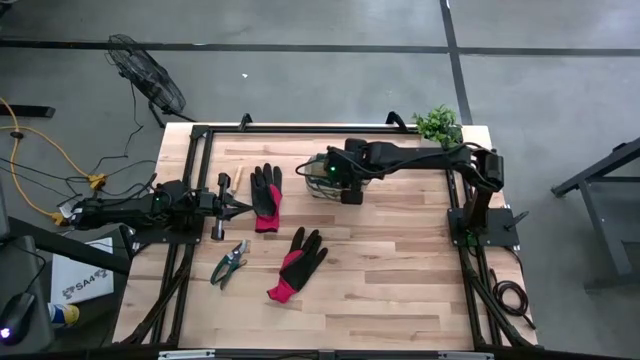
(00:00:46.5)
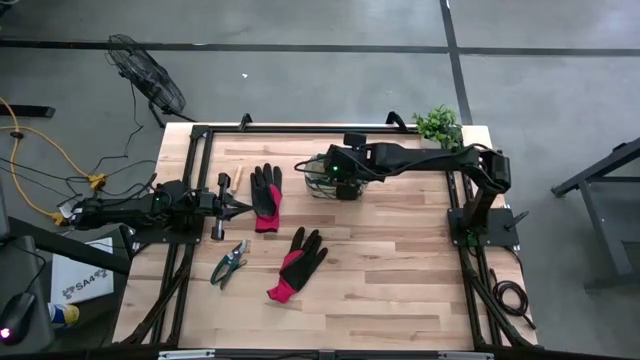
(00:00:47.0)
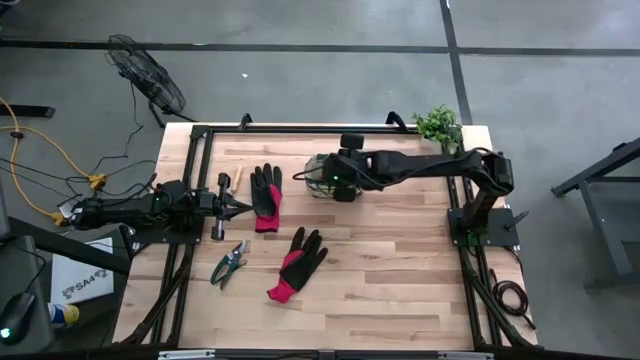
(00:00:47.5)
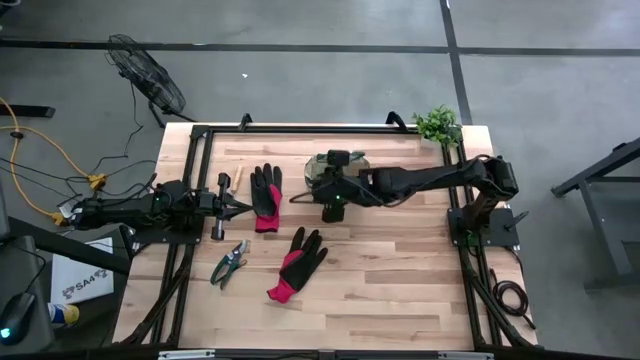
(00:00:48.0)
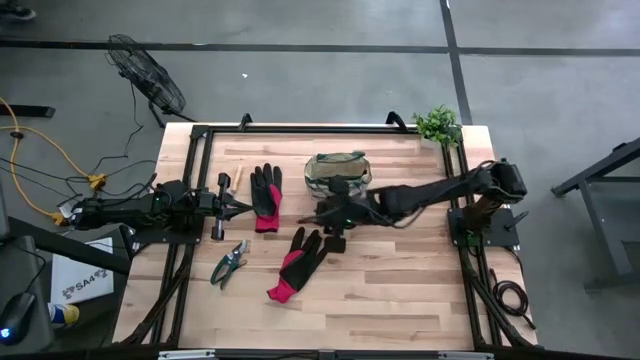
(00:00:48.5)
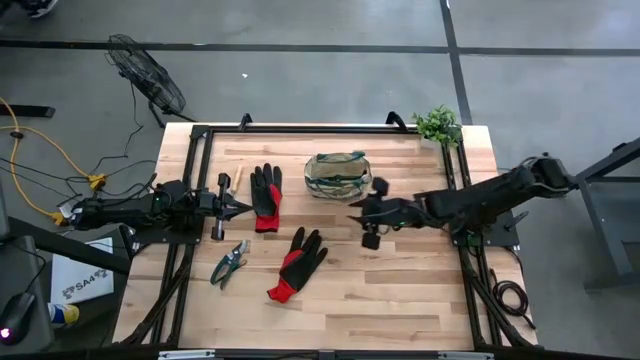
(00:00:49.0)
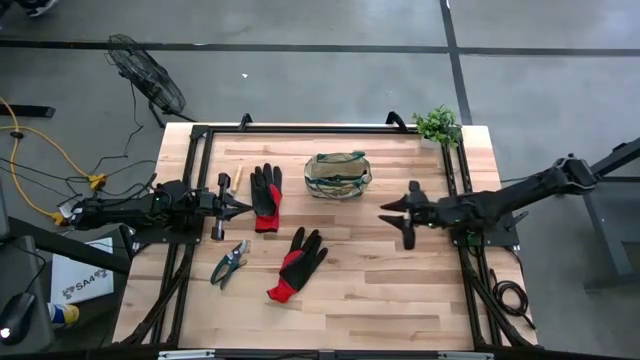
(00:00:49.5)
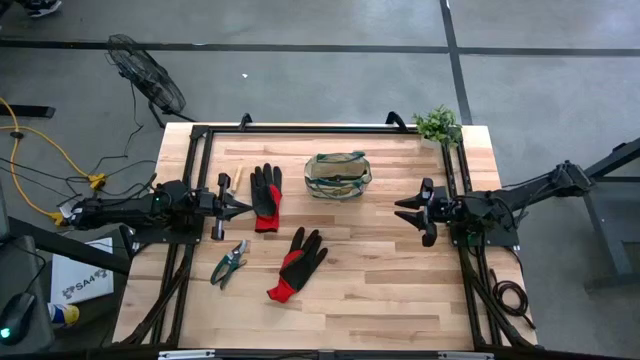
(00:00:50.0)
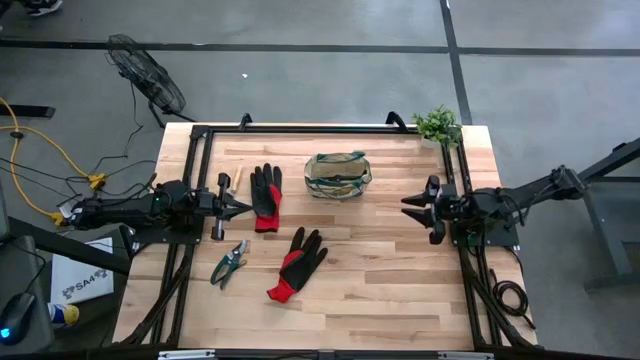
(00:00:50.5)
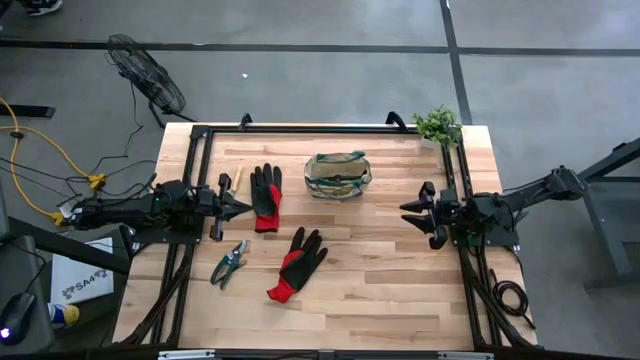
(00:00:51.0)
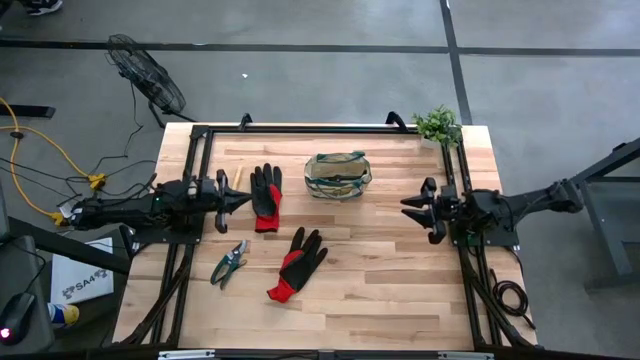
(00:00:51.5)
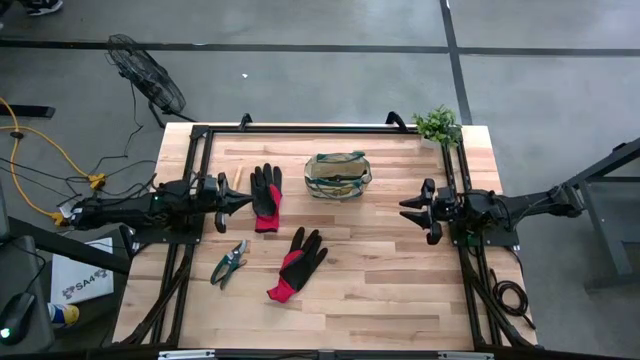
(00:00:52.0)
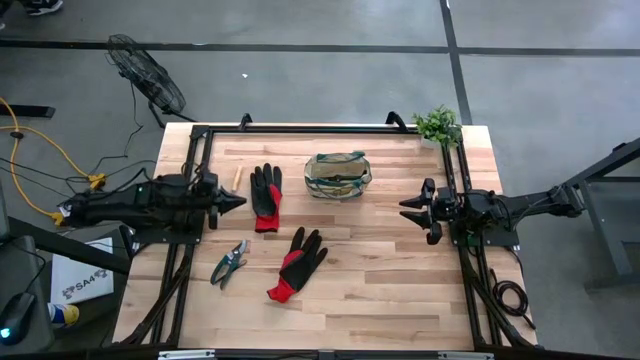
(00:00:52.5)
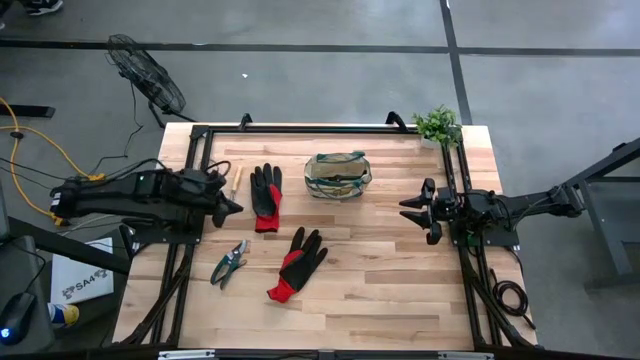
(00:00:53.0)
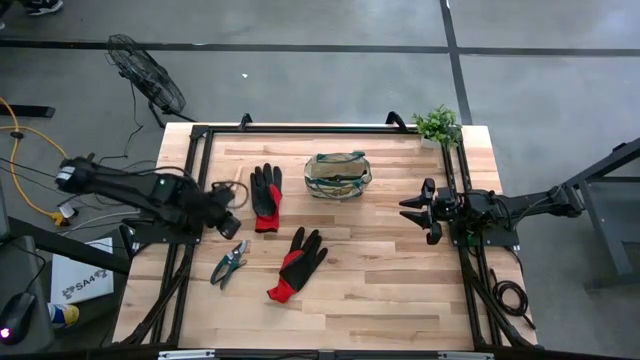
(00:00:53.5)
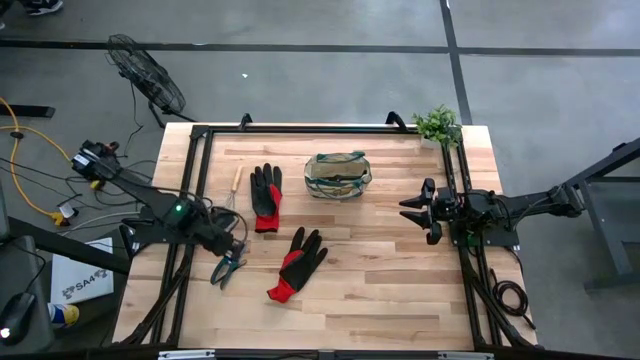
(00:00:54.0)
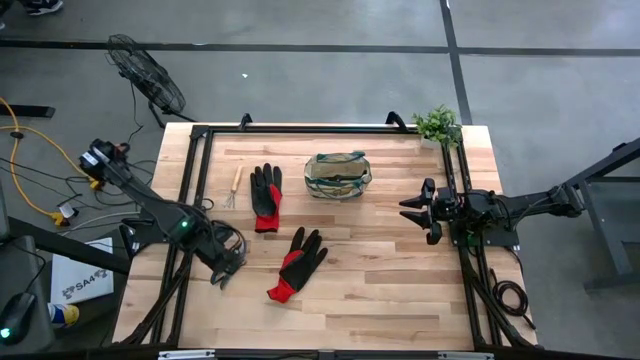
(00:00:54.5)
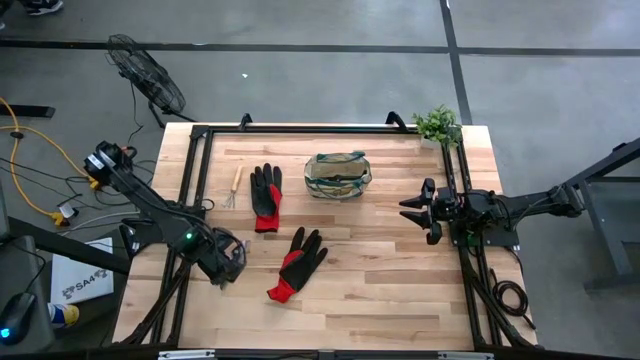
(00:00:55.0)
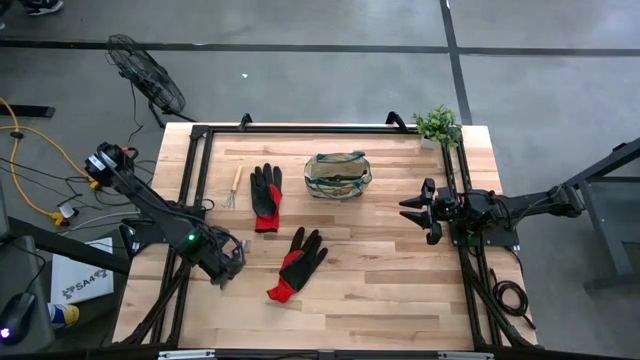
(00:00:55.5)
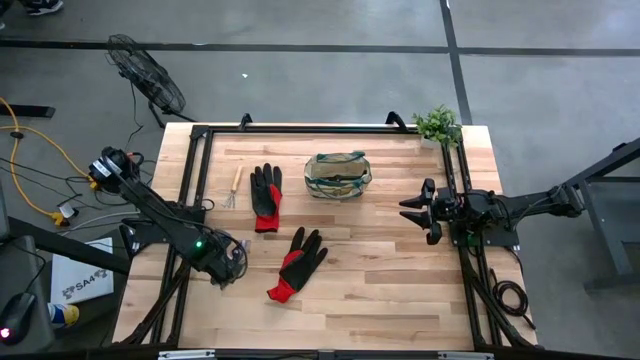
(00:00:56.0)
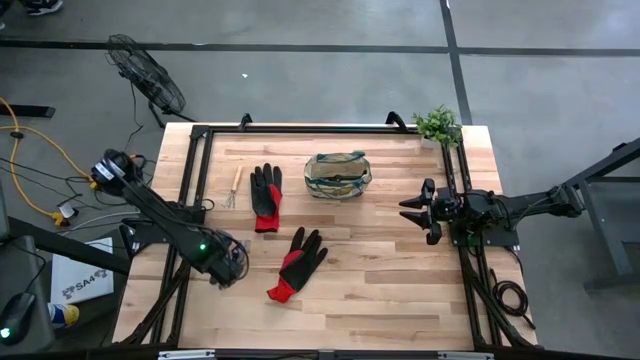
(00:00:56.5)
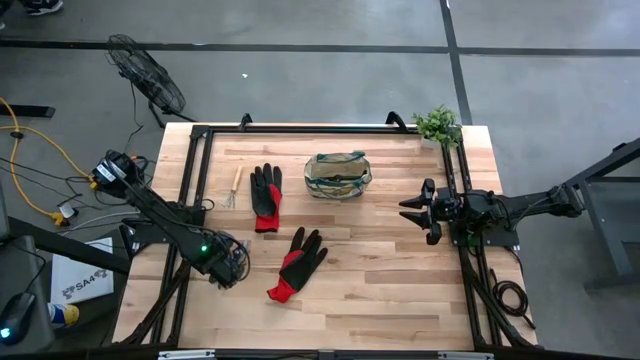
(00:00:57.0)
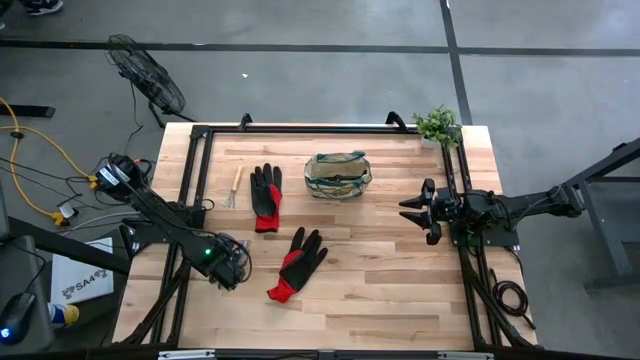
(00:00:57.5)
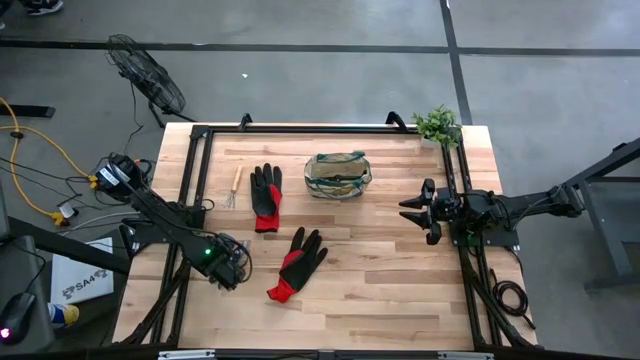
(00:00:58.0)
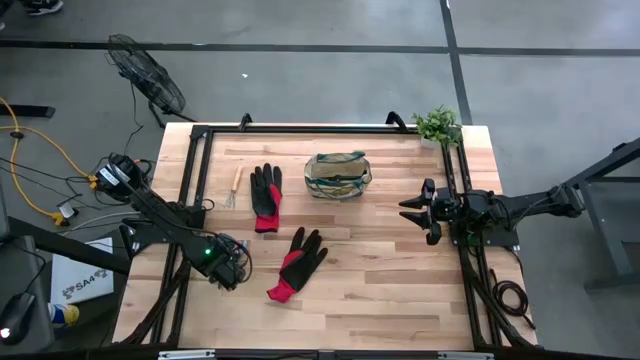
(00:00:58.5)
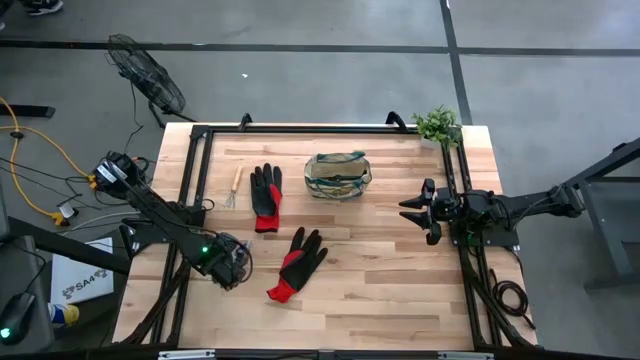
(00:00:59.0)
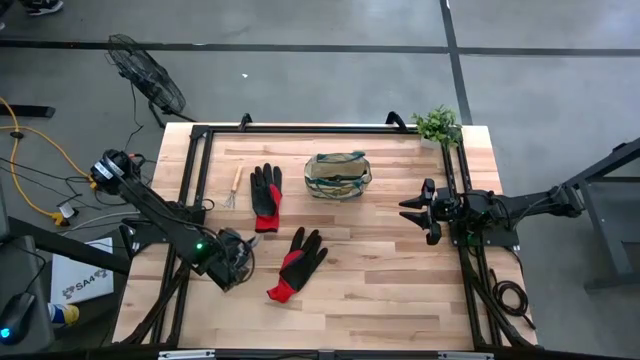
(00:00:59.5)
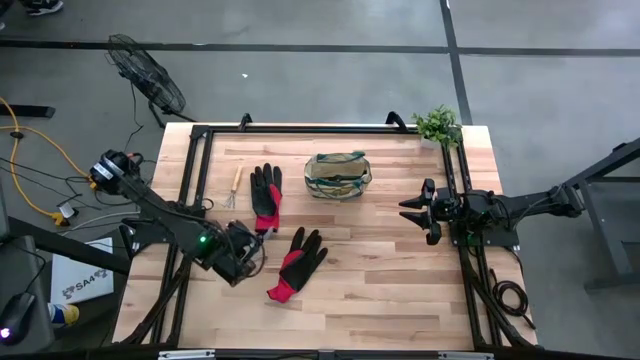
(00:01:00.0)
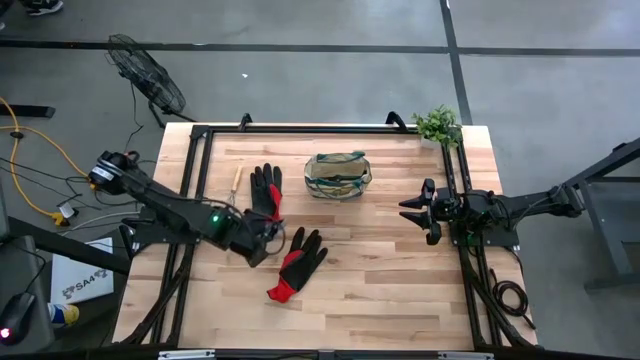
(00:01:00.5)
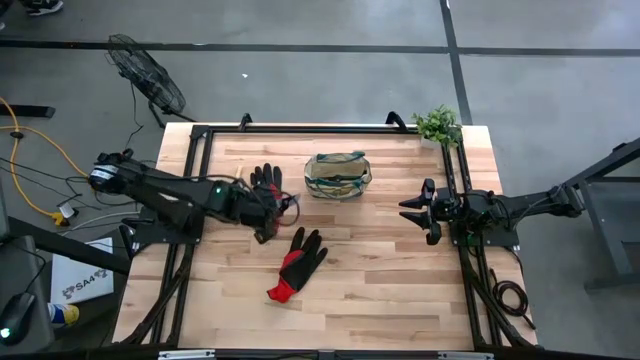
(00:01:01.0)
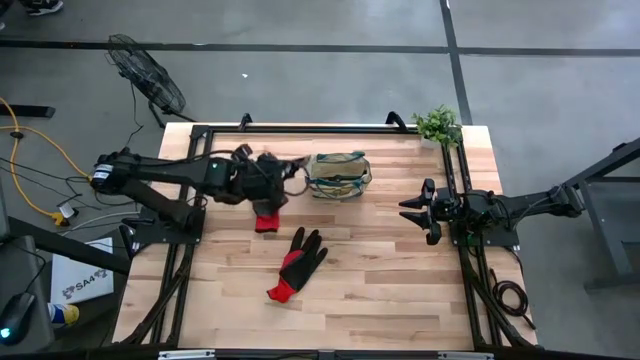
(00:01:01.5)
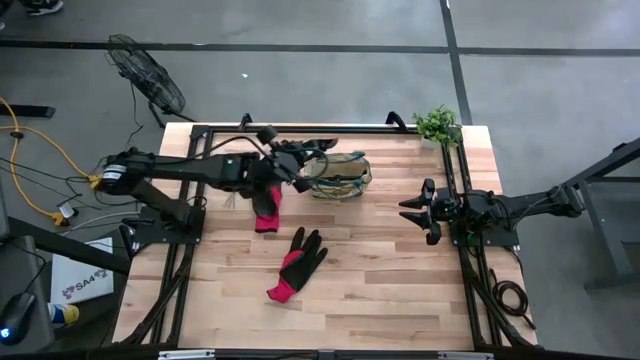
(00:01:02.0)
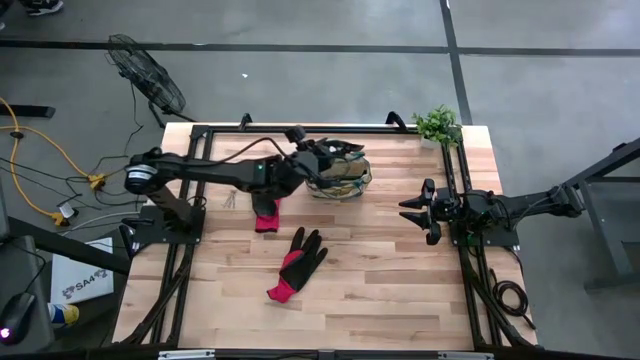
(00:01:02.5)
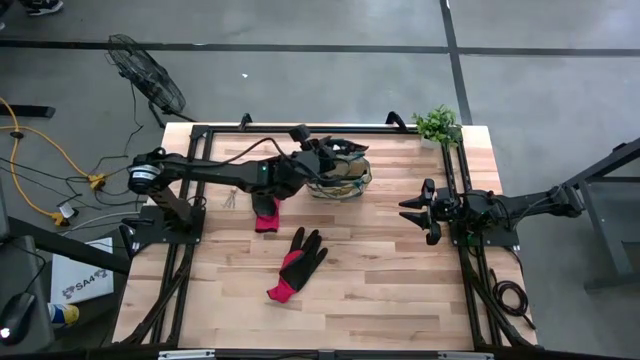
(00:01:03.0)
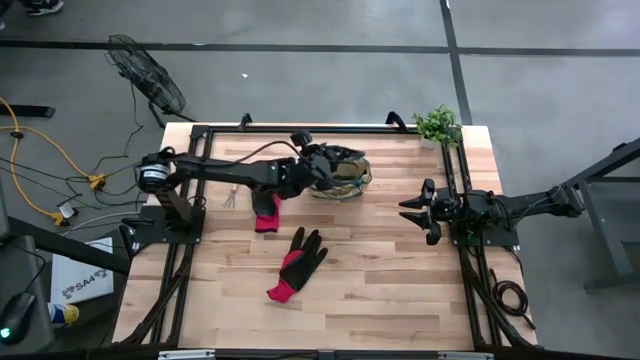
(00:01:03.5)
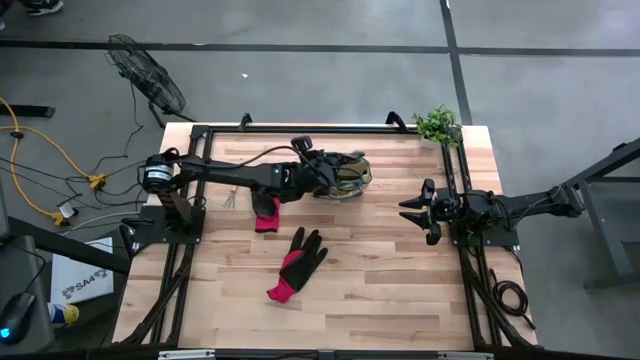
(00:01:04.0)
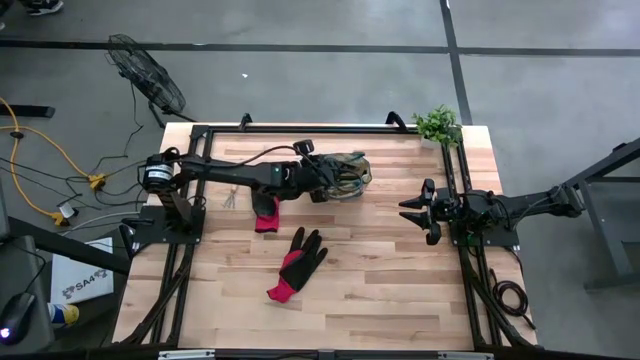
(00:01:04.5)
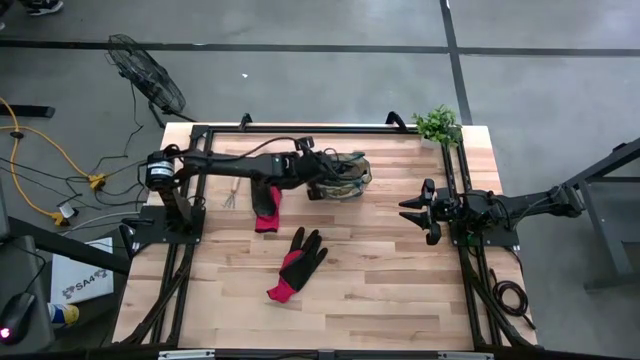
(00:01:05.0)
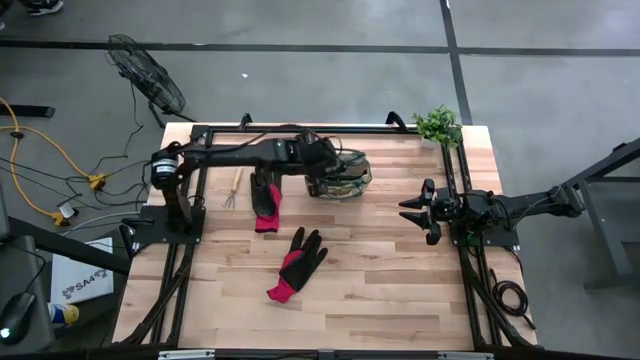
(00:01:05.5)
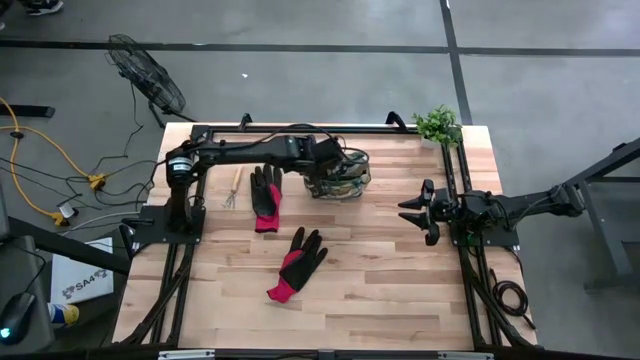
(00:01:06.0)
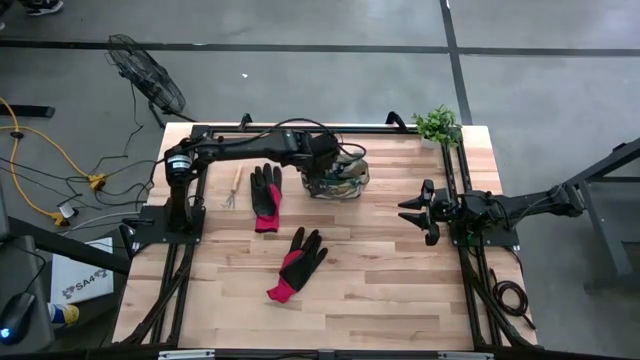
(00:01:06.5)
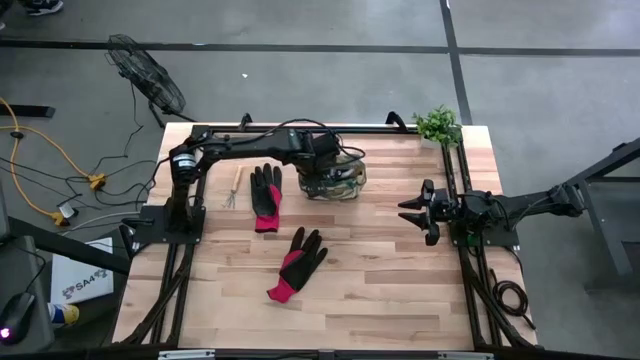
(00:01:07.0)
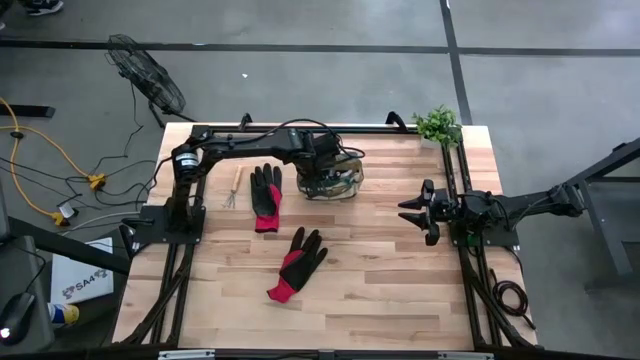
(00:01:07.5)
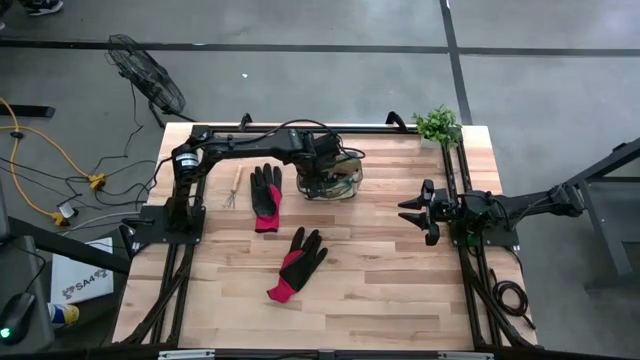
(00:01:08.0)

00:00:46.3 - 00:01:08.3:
Task: Pick & Place Garden tools in Gardening bag
Put the green shear scissors into the gardening bag
